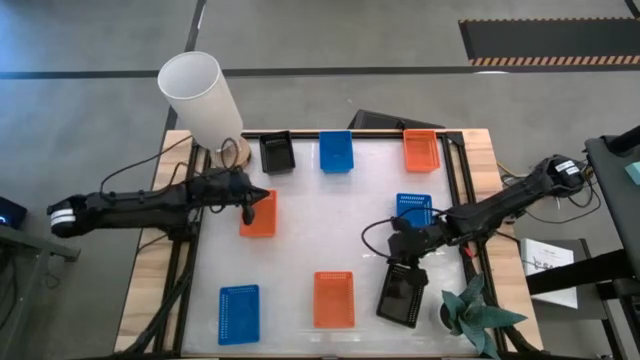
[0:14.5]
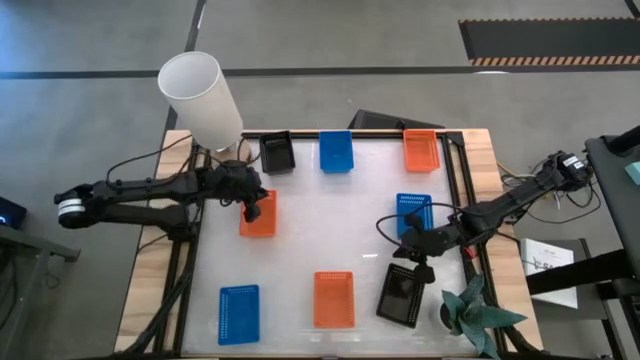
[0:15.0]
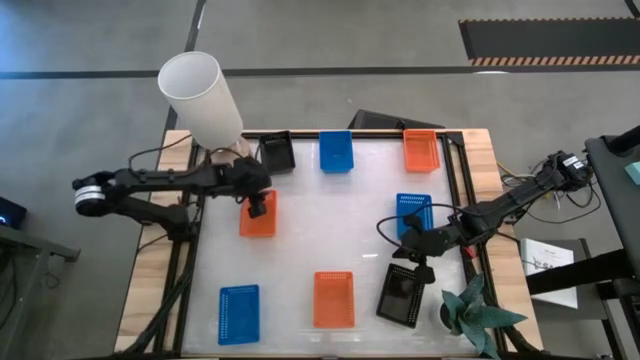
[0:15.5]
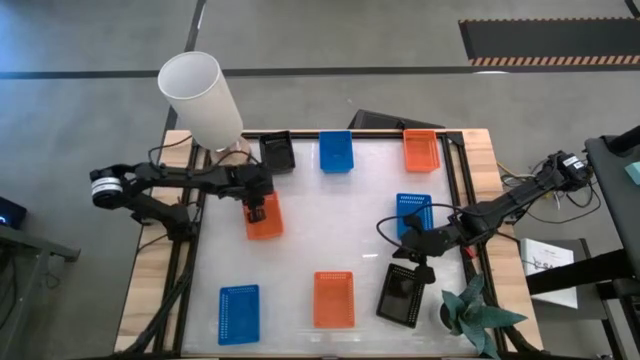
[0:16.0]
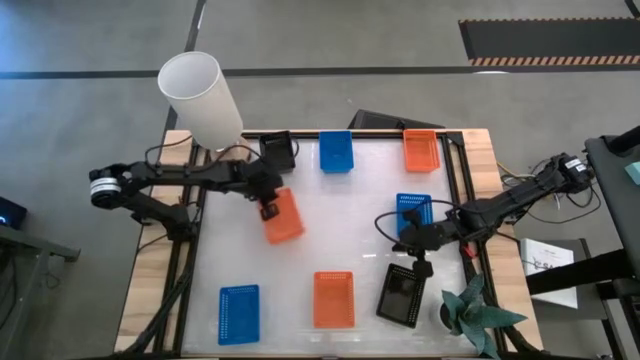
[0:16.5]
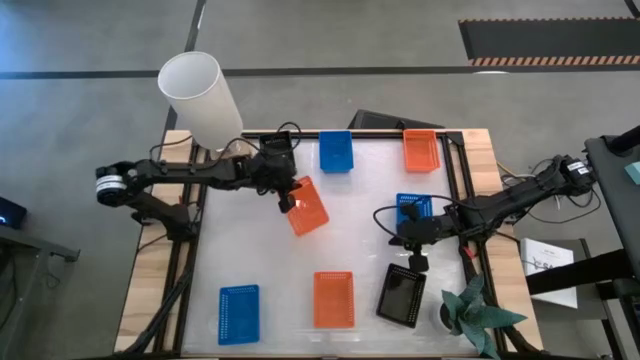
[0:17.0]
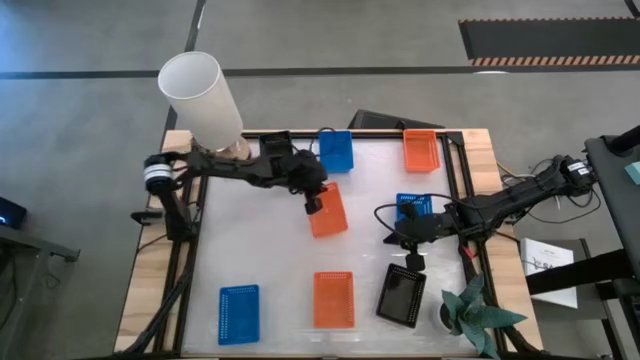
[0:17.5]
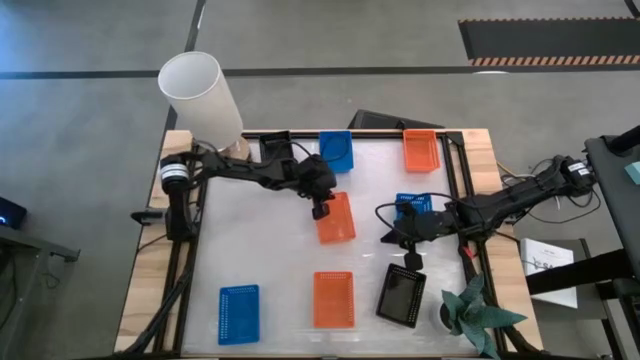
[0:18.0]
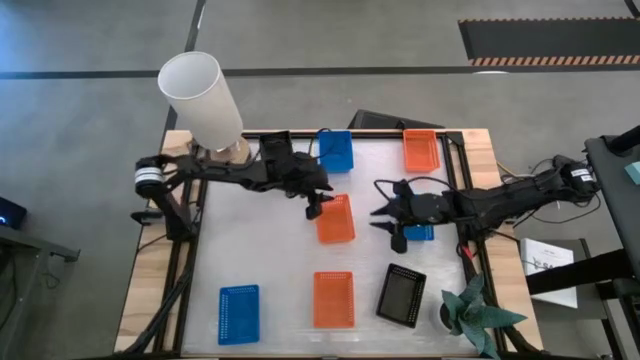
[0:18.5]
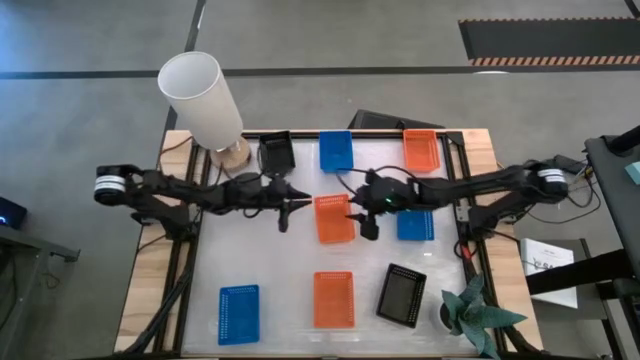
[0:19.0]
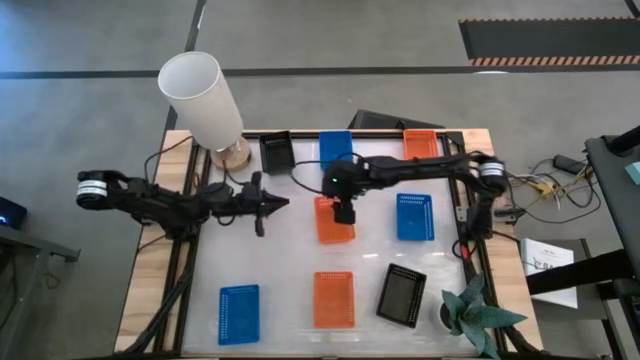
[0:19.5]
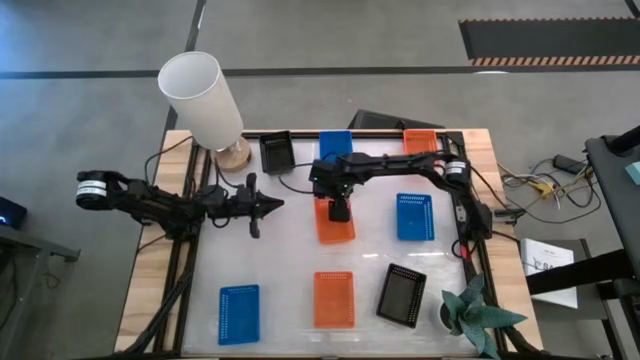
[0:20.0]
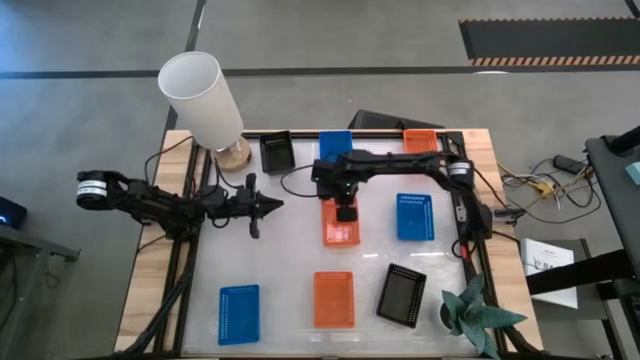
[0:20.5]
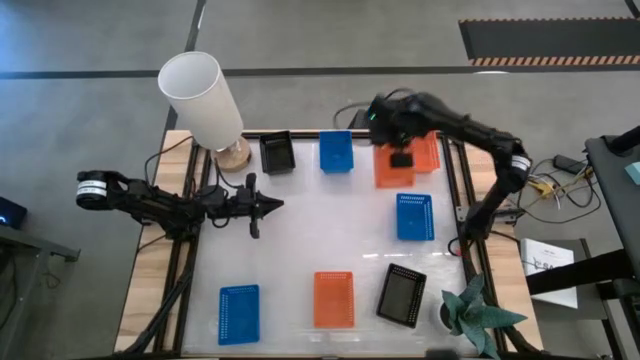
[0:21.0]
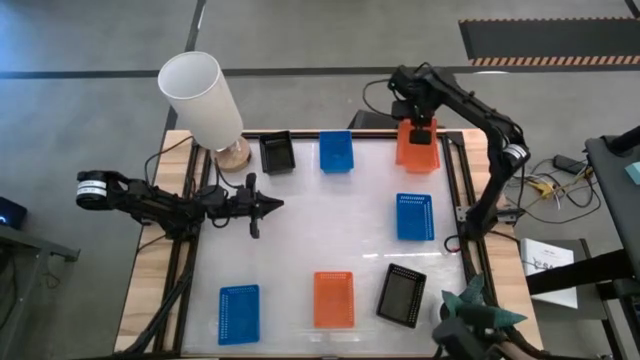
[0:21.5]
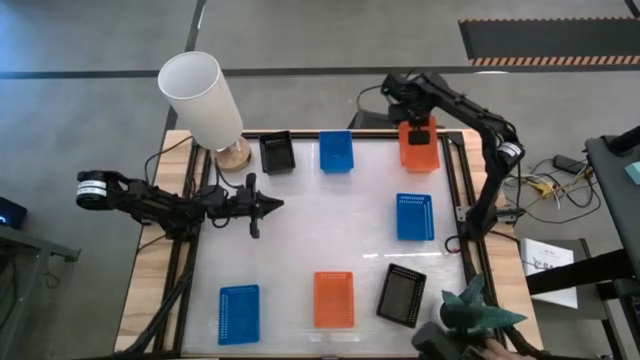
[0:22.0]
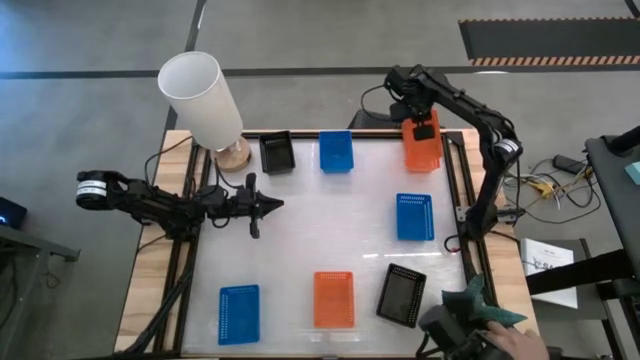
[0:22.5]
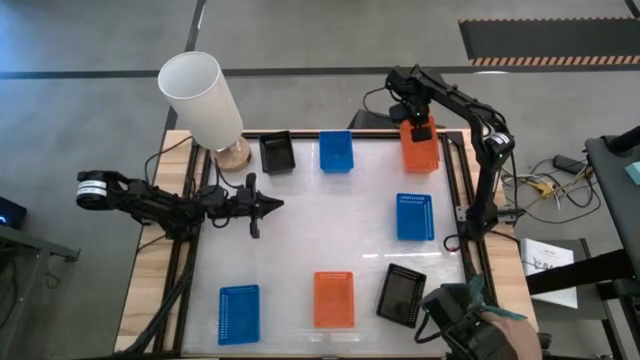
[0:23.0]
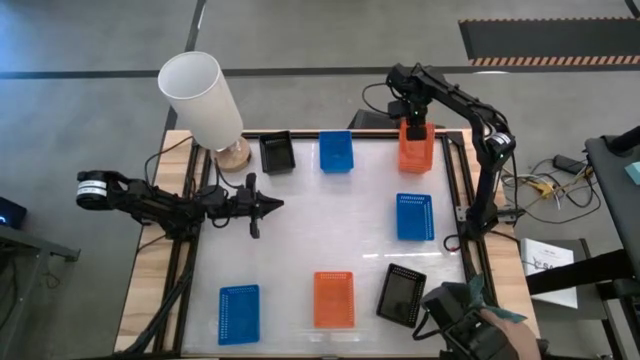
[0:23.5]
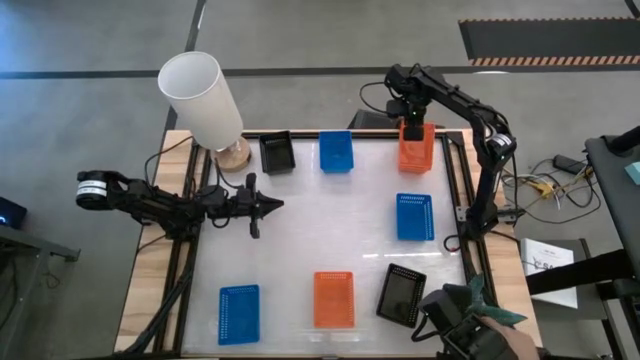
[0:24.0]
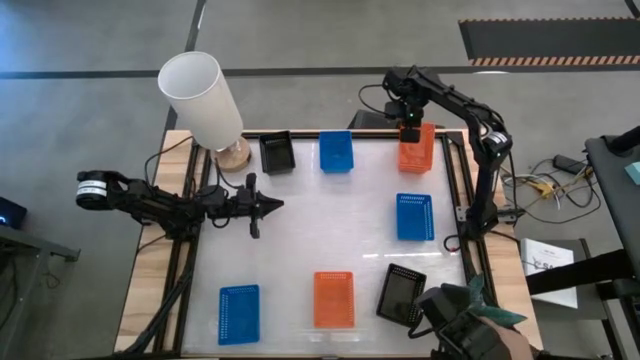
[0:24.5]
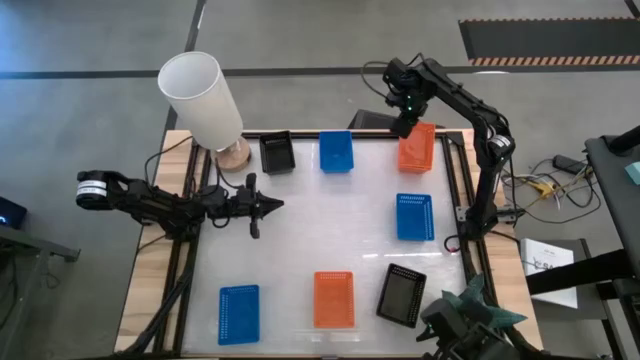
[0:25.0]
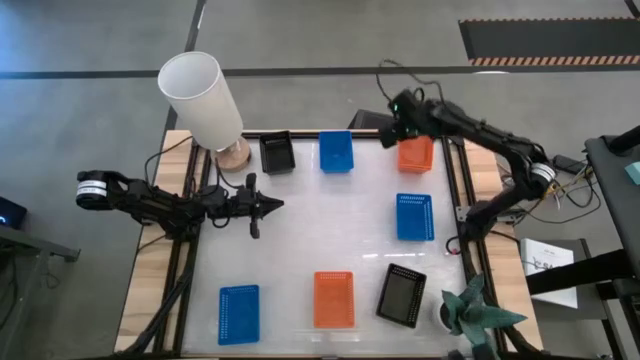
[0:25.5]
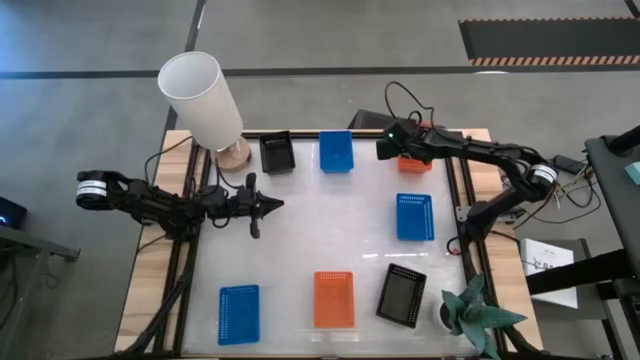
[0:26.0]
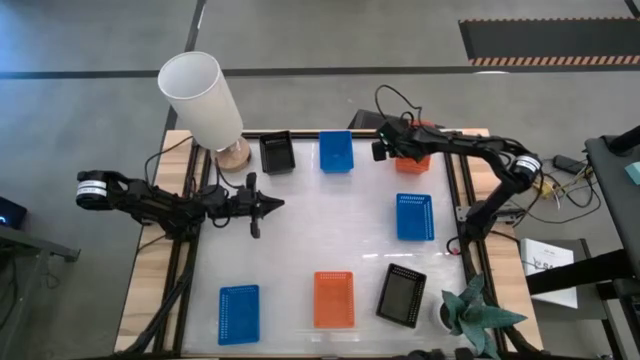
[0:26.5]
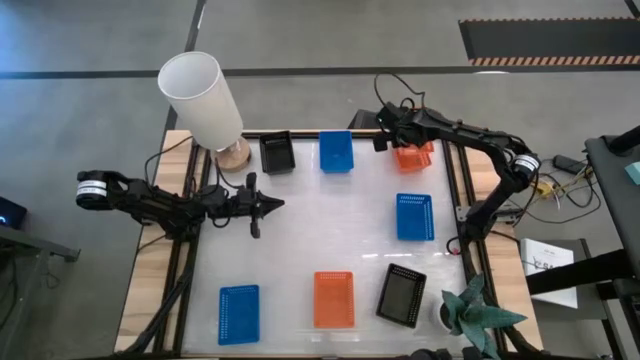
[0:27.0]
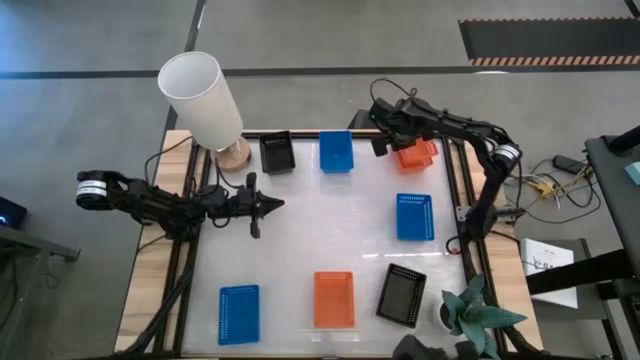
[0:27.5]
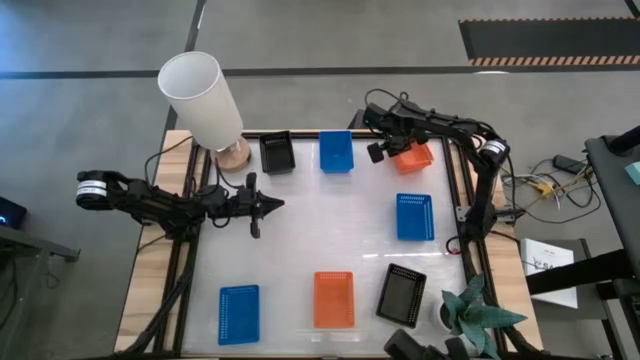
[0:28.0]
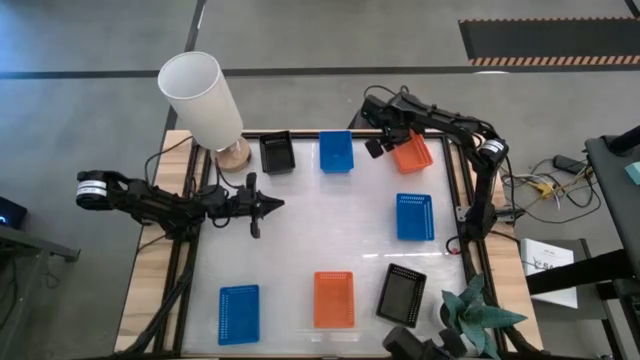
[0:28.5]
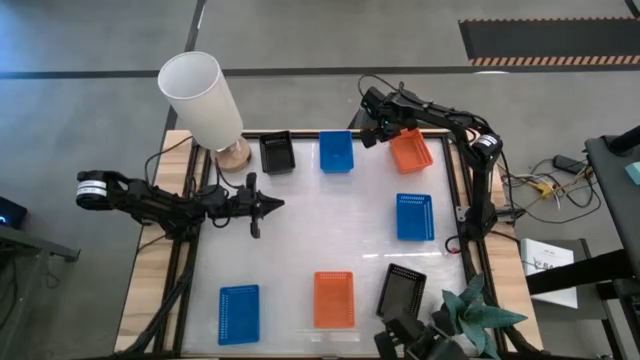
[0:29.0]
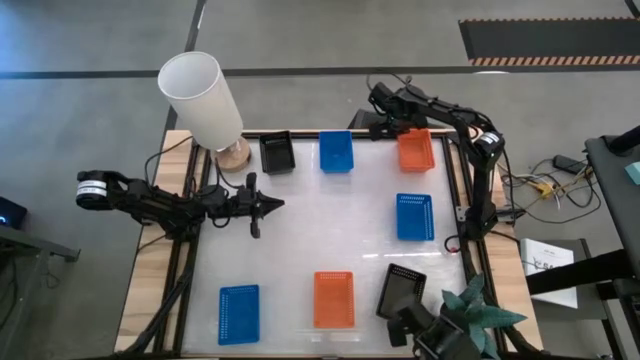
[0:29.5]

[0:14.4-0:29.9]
Stack the middle left orange bin on top of the top right orange bin

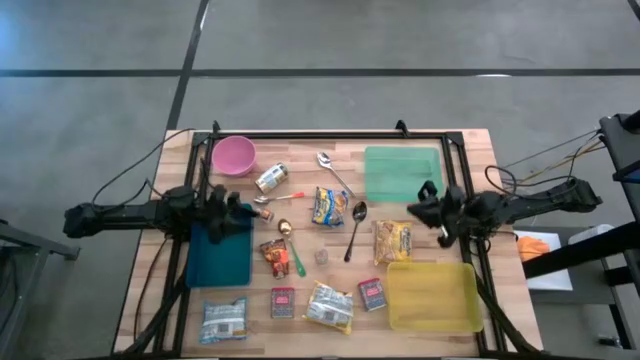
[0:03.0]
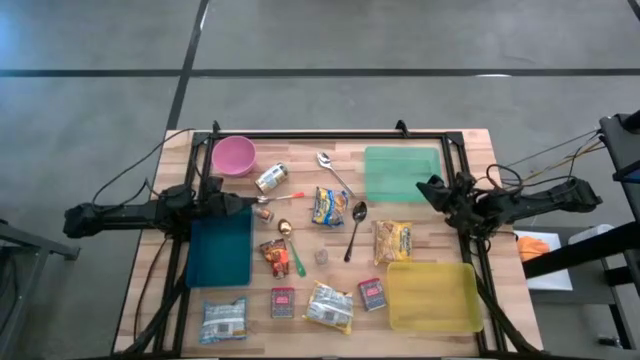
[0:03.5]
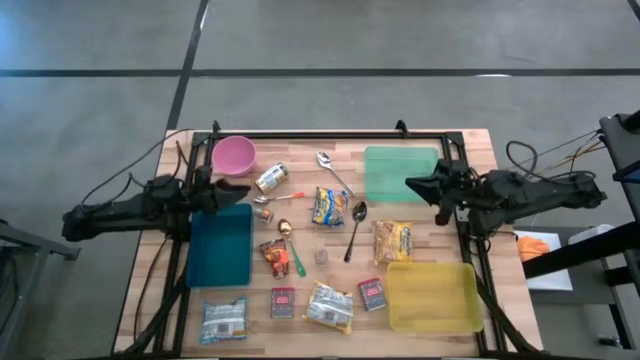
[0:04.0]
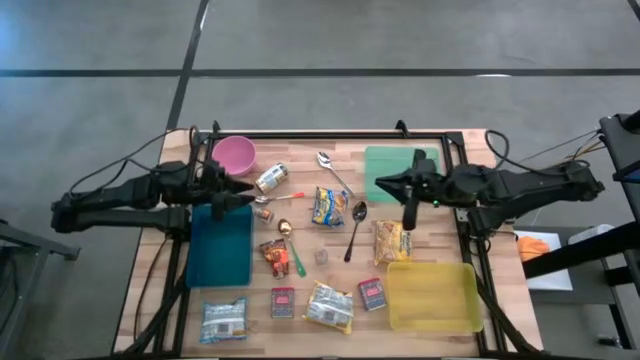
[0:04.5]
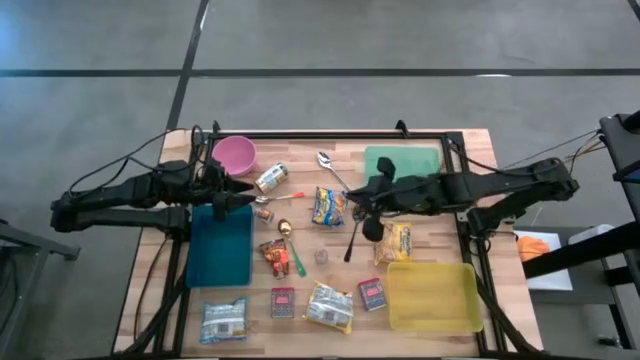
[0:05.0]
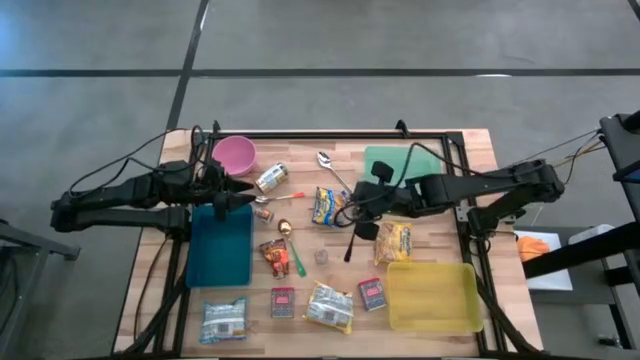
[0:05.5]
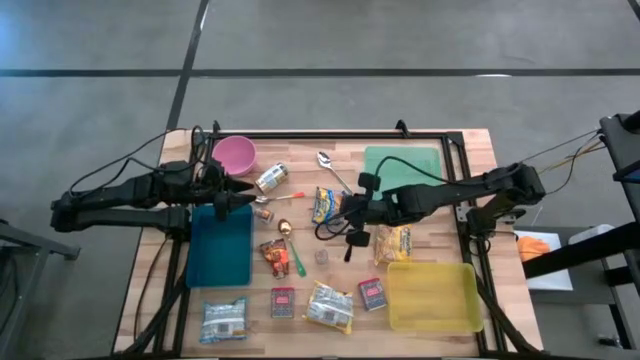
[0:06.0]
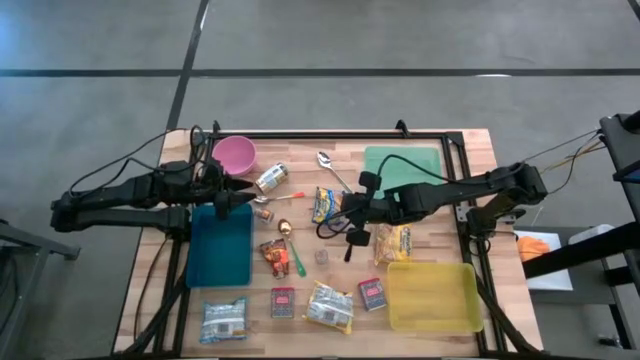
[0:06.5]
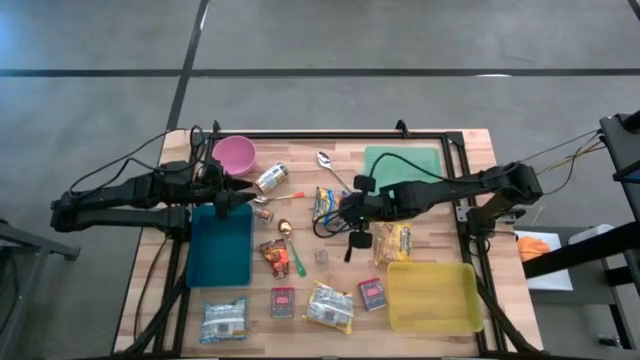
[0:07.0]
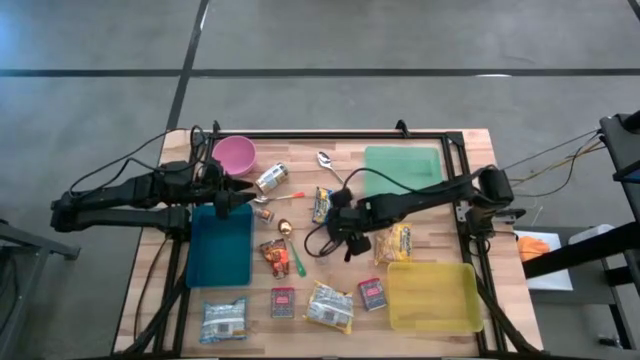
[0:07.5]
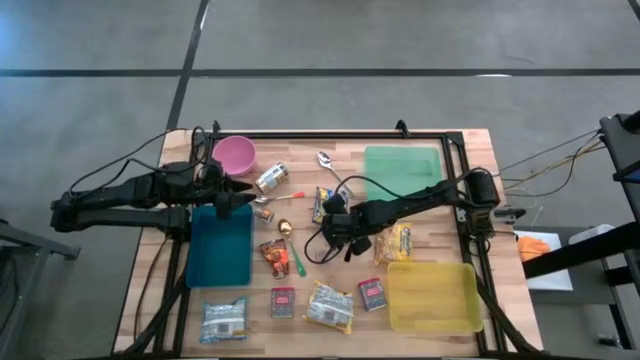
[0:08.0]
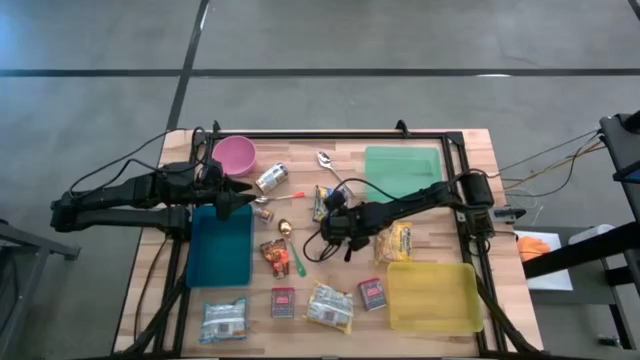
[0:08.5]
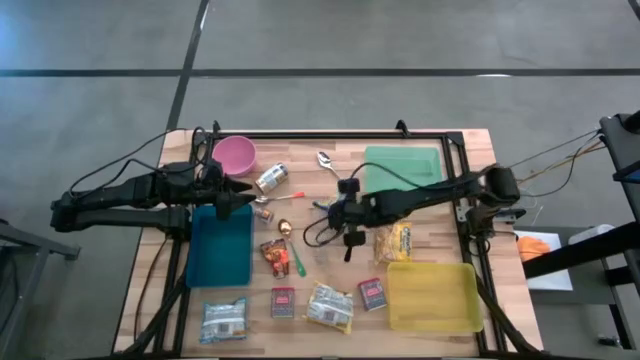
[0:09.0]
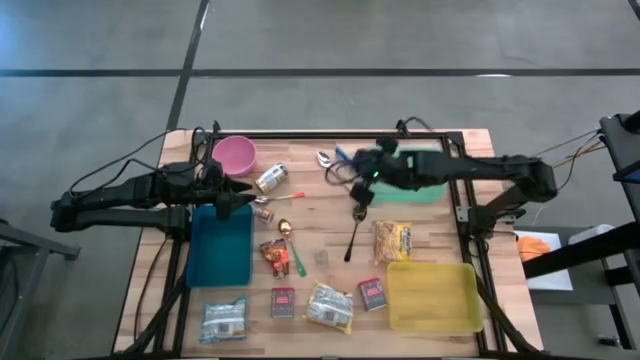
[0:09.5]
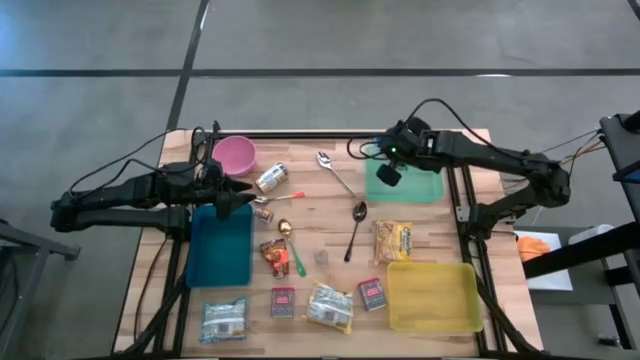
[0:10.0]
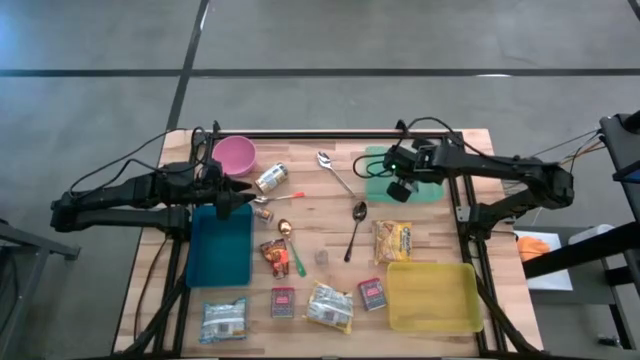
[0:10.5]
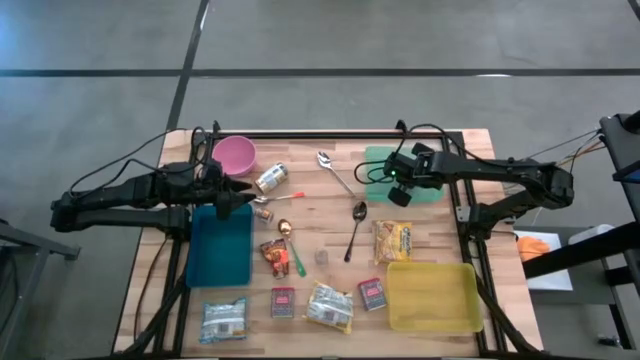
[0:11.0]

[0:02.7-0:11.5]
Put the blue noodle pack into the green bin
